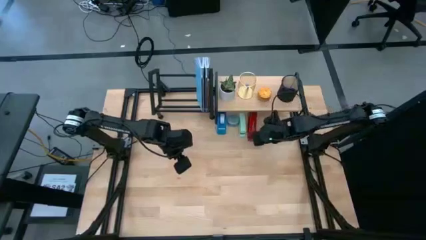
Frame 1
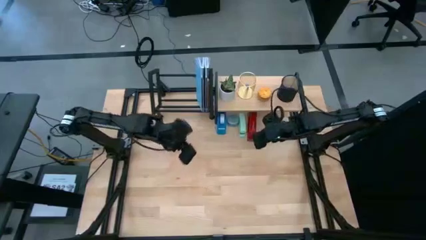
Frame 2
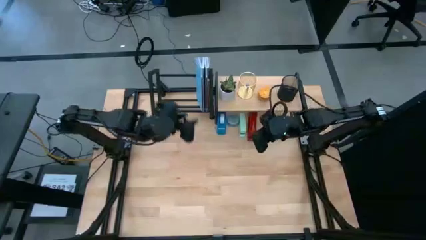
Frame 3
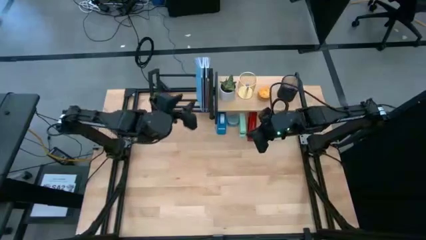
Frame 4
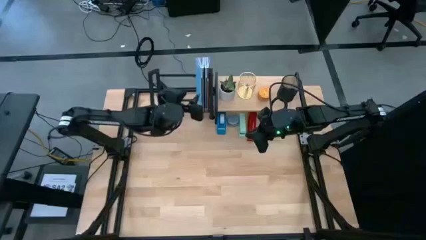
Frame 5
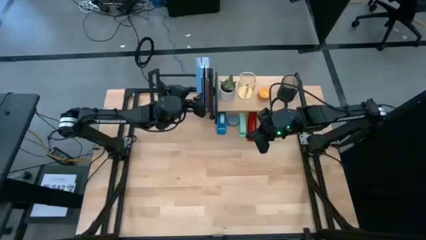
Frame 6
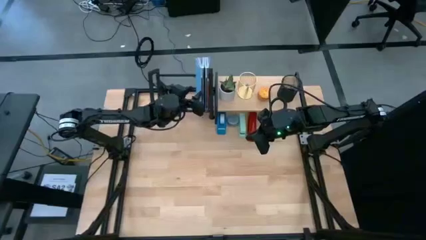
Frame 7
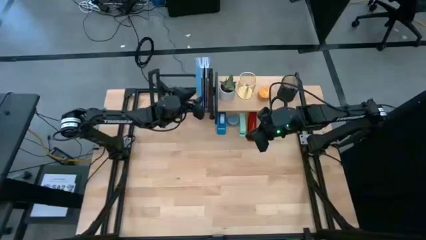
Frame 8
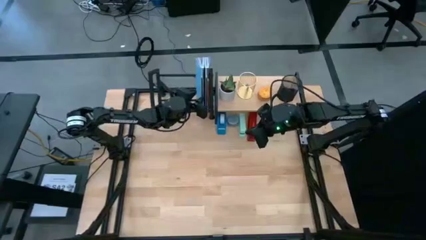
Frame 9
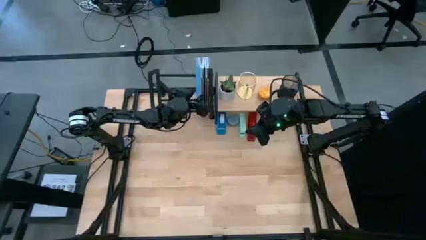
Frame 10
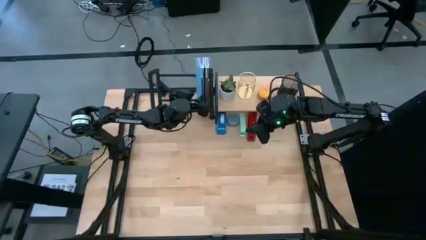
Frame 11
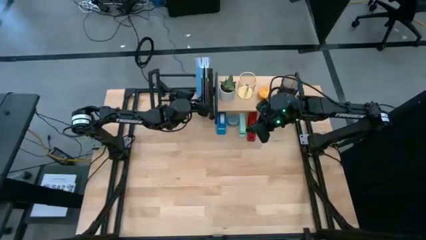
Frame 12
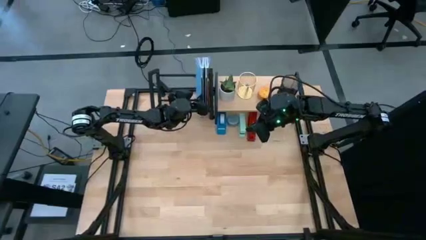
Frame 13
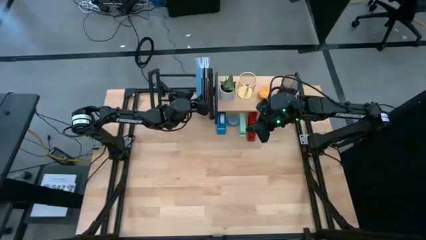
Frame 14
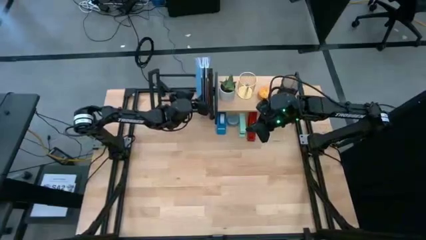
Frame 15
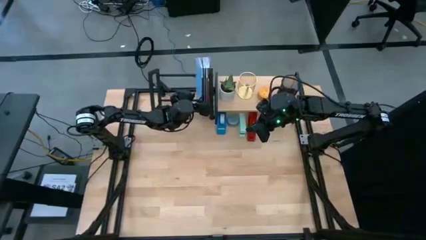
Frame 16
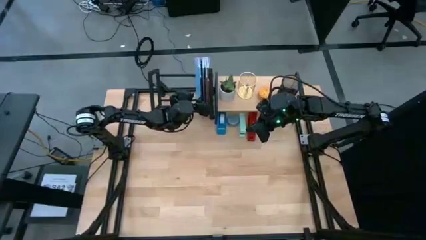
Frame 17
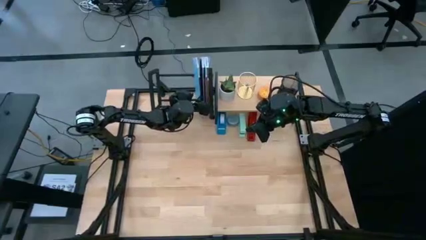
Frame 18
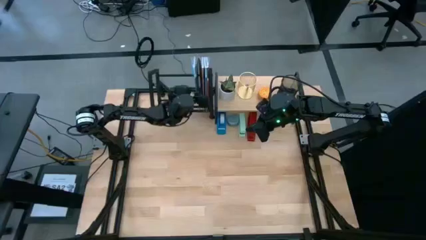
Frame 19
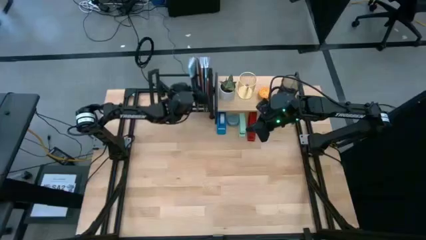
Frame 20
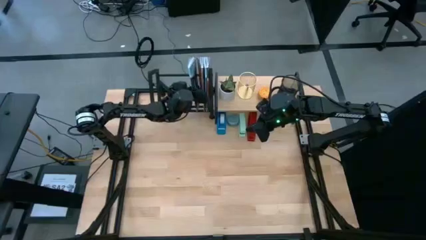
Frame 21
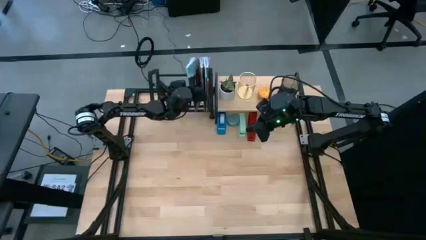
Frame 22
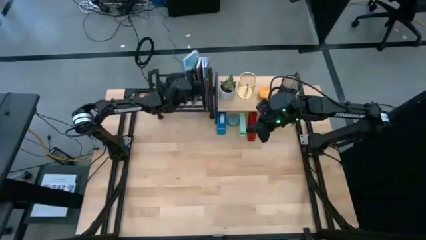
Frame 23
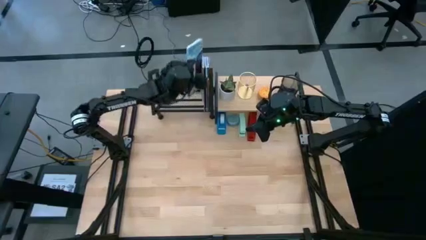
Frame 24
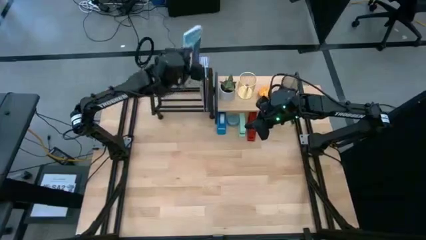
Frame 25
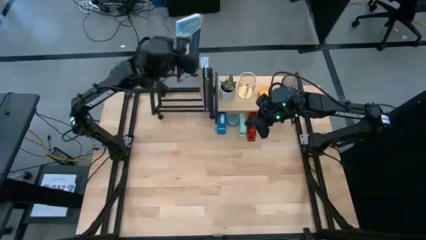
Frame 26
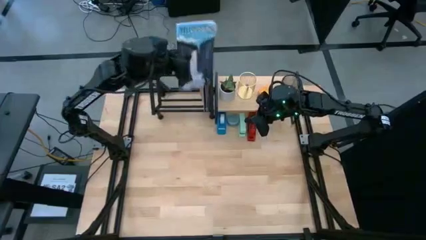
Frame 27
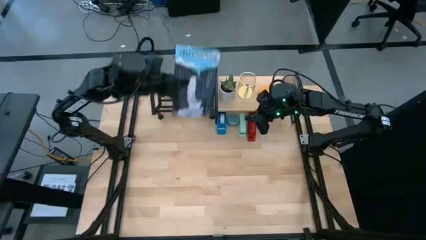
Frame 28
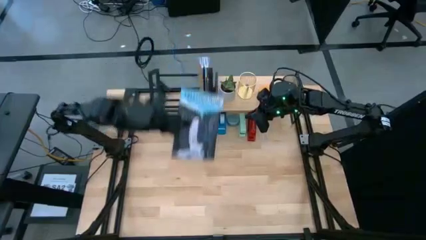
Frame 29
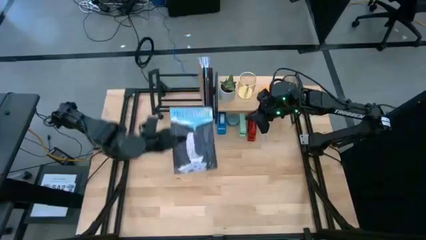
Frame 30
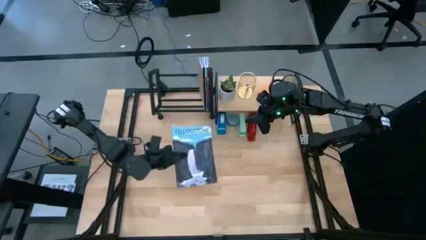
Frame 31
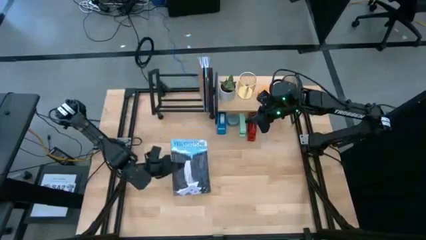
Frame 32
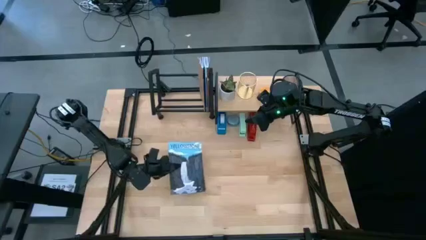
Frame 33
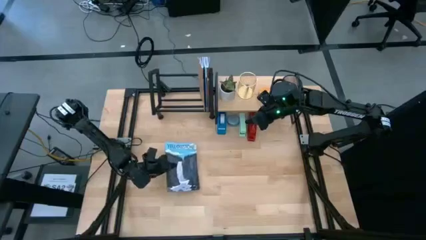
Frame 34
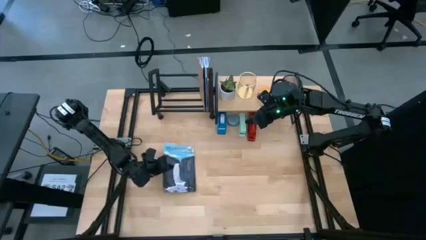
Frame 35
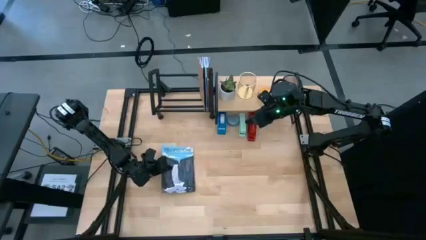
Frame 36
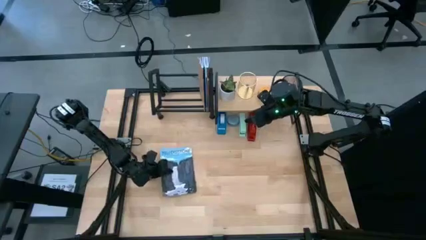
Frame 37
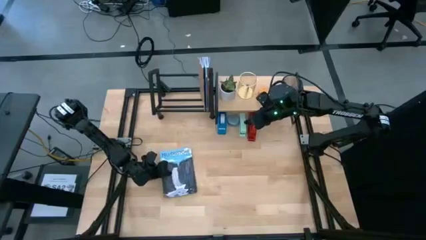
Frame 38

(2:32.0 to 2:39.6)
Task: Stock shelves
Remove the blue book from the black book shelf

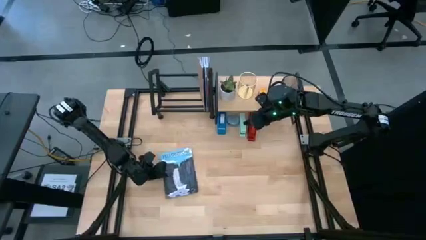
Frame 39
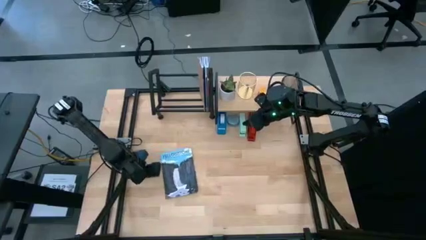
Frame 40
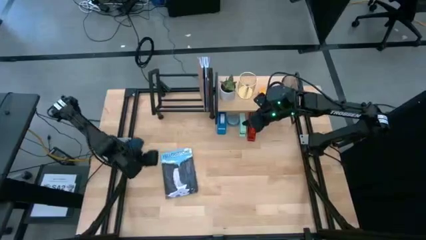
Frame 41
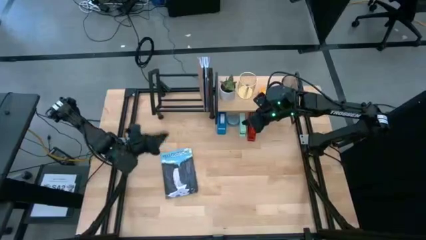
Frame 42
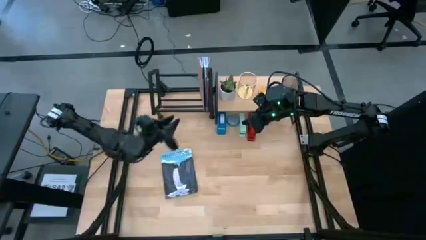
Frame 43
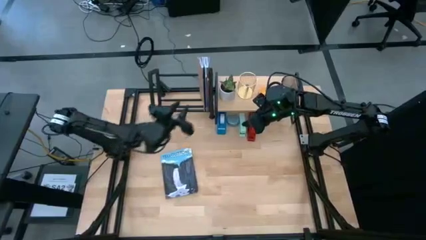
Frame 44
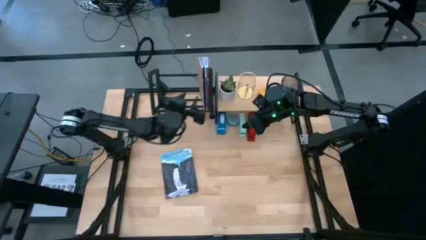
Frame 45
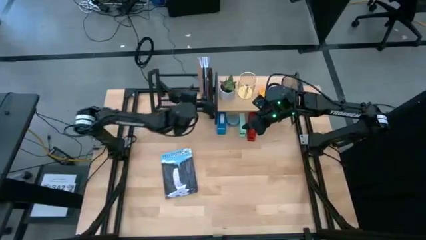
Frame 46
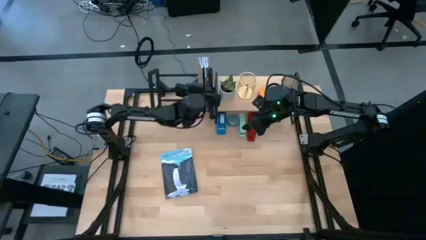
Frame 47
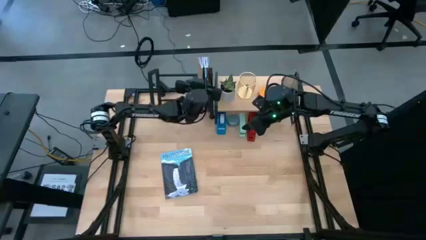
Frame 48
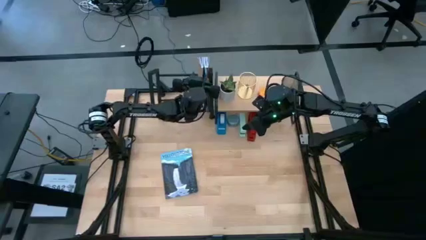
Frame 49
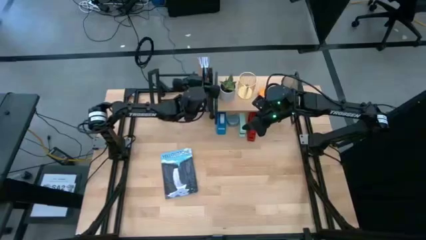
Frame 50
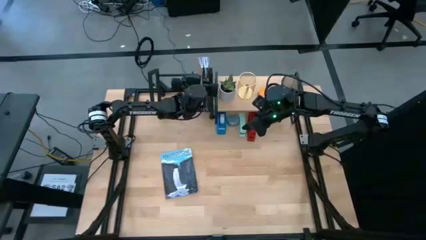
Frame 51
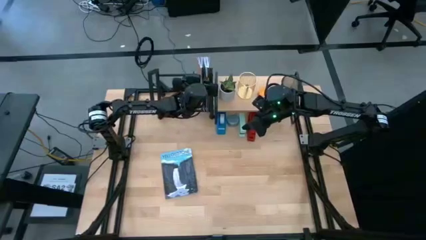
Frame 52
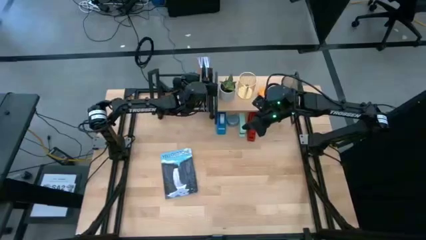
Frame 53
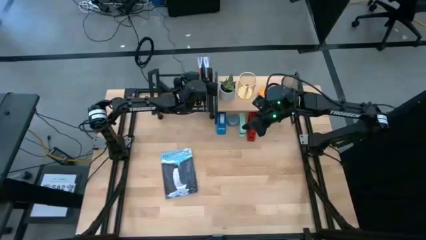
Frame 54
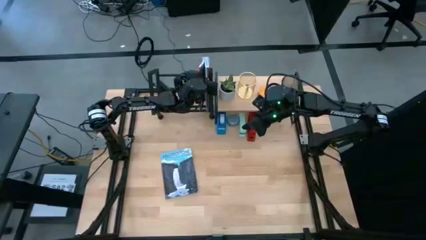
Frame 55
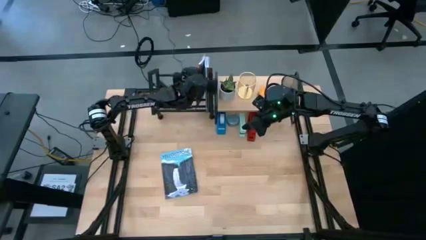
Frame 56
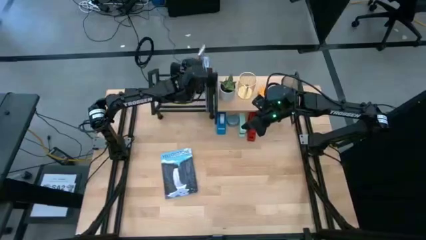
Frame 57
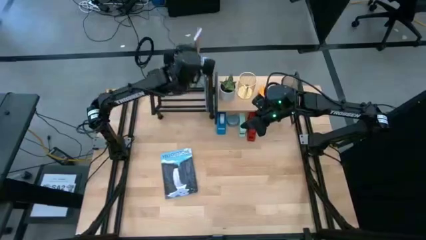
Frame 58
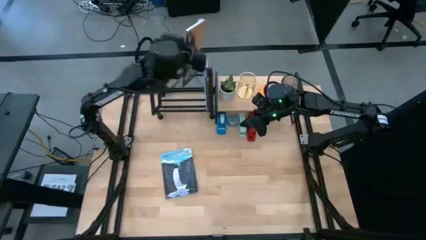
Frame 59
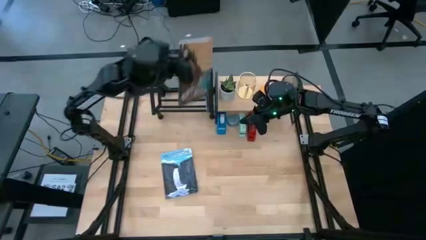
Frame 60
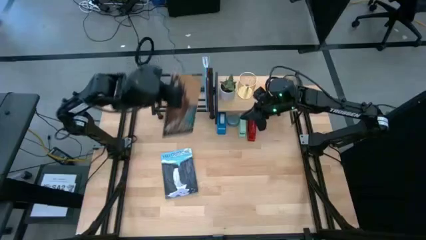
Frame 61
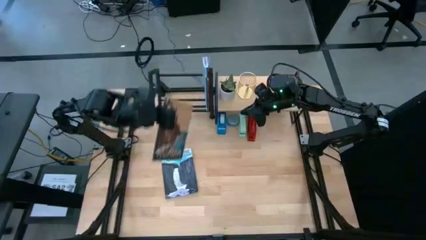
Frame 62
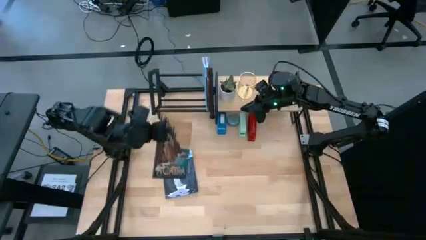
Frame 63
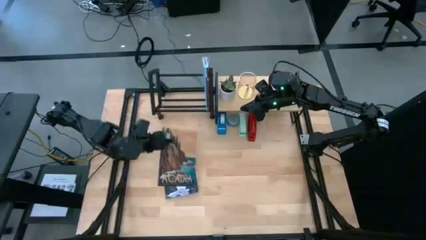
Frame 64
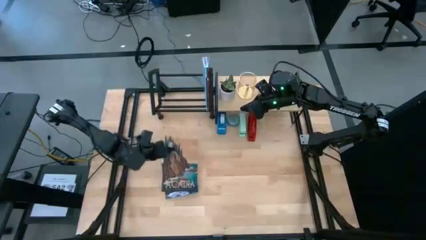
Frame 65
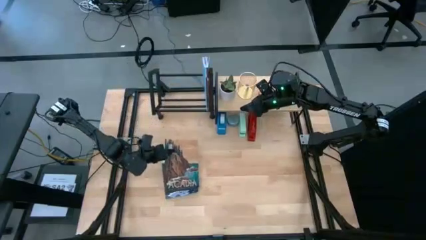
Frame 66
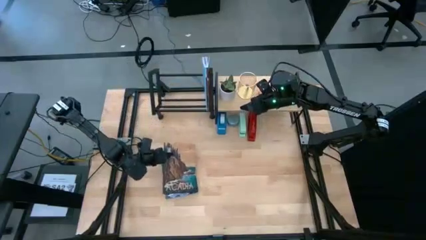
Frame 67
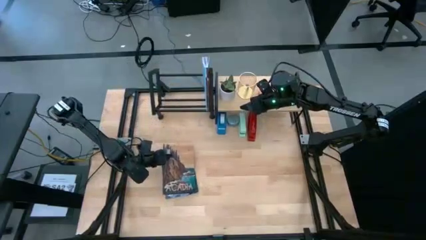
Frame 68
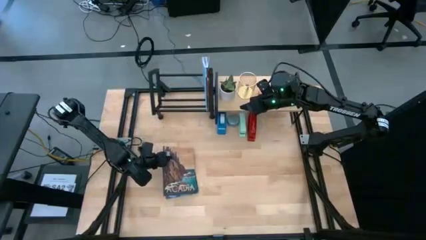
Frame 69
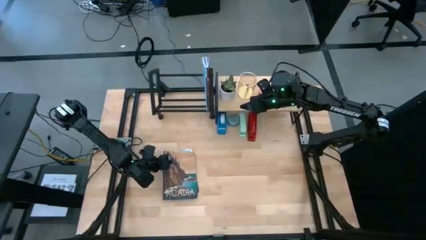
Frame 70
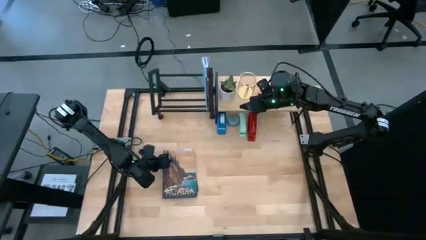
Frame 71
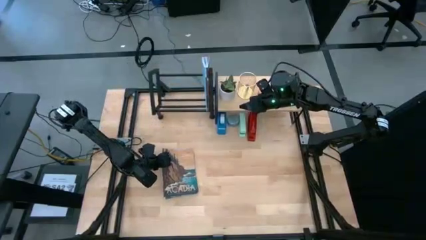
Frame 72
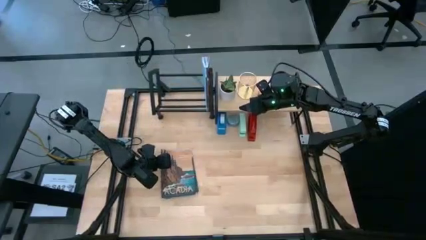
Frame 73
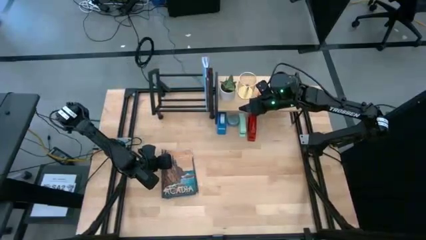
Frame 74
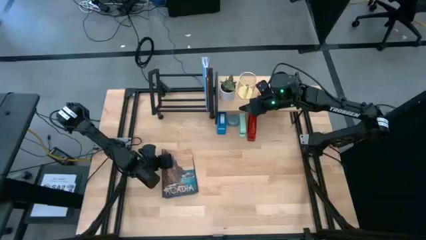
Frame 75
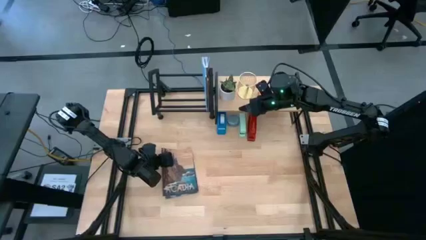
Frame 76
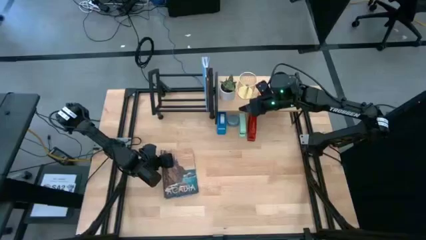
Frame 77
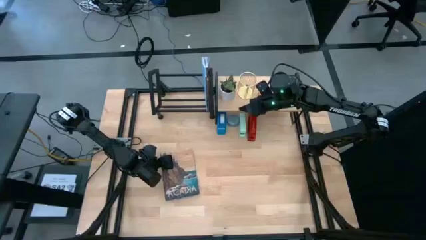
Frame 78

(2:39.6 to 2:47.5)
Remove the brown book from the black book shelf

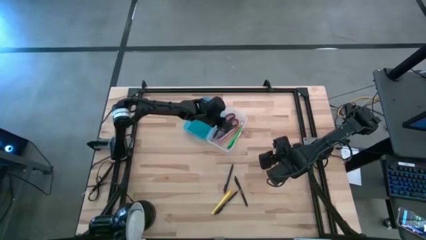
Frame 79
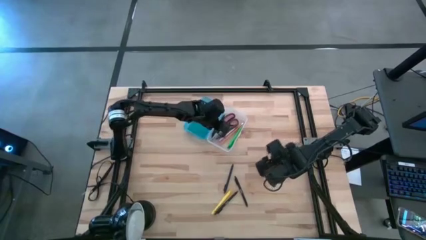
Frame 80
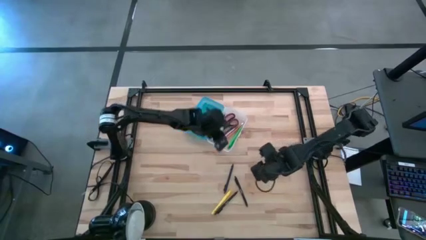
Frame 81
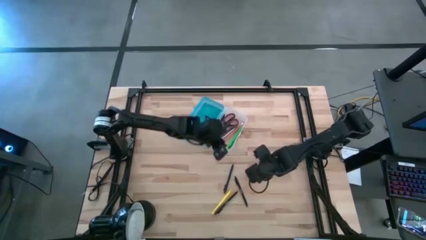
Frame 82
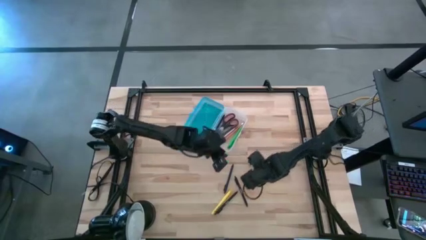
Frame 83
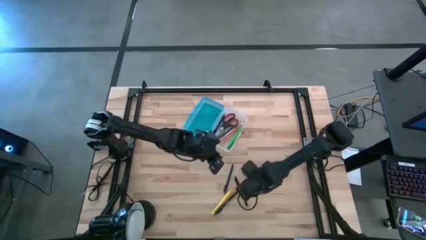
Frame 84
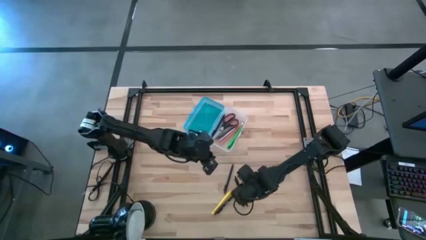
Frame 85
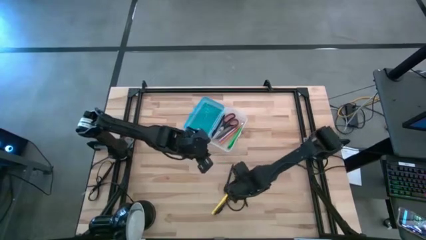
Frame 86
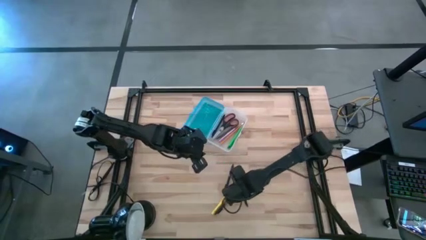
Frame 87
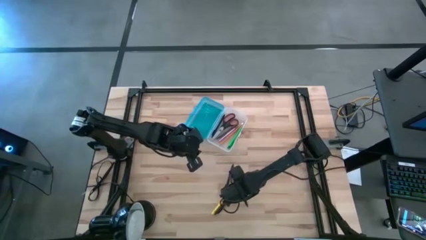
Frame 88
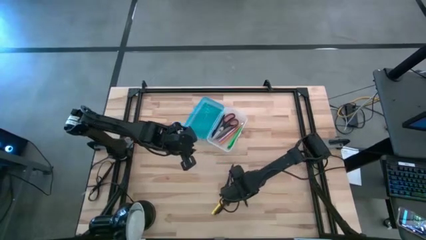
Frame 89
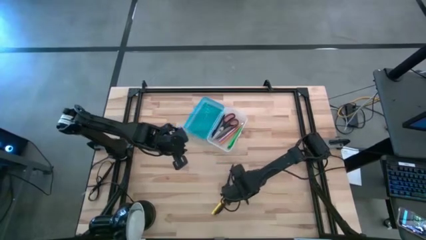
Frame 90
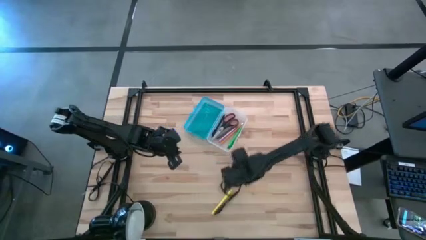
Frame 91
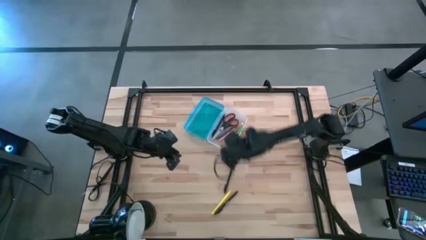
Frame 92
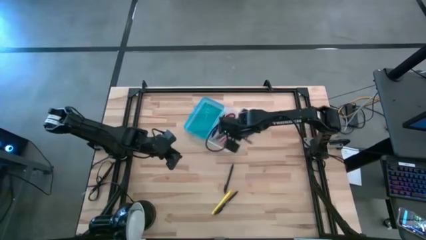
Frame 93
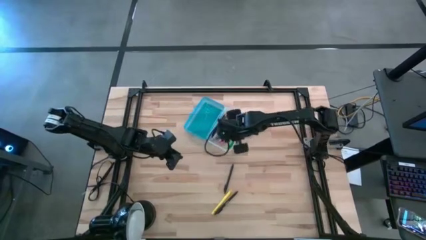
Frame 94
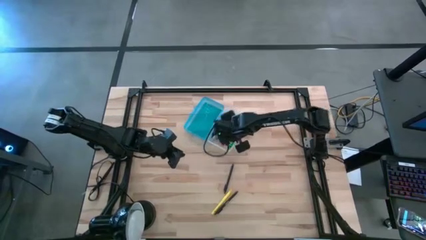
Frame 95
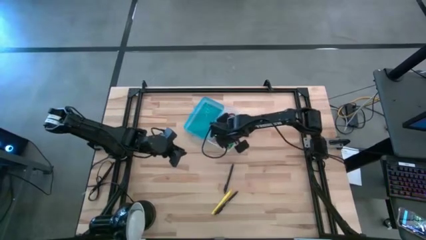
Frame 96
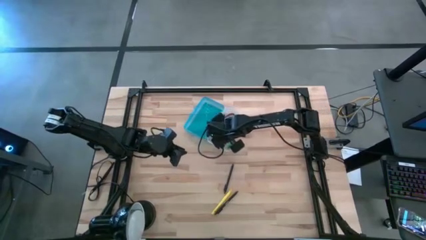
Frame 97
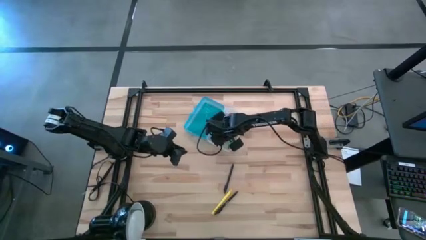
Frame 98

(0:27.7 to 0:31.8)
Task: Pick & place school supplies into a supply box
Put the black pen into the blue supply box
